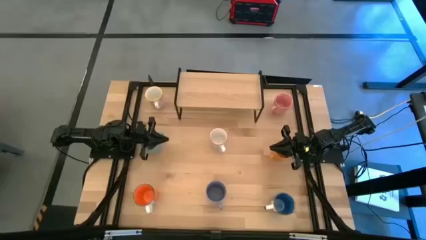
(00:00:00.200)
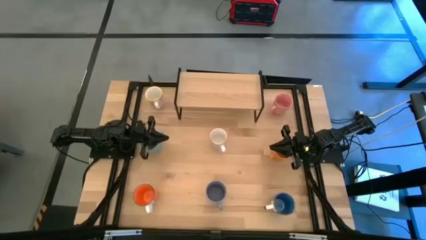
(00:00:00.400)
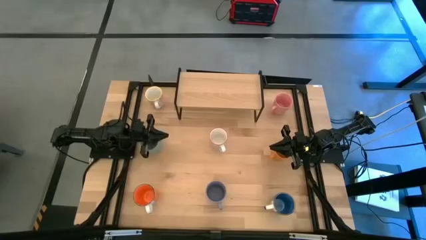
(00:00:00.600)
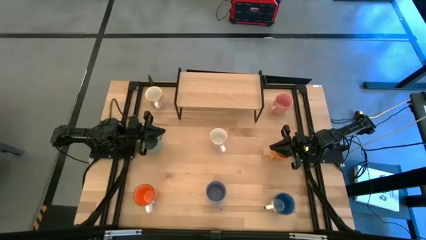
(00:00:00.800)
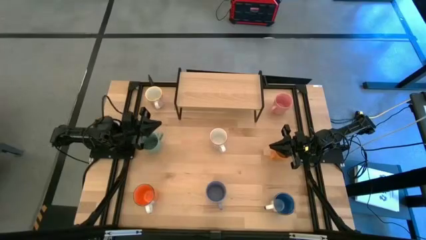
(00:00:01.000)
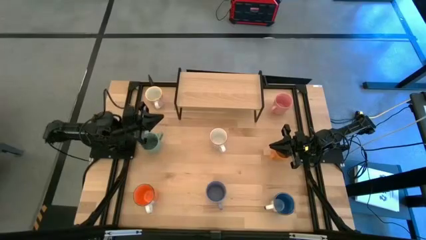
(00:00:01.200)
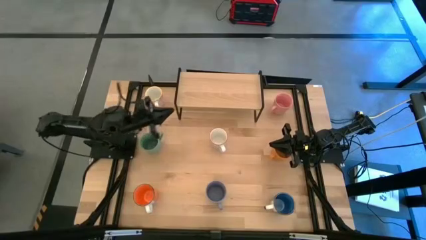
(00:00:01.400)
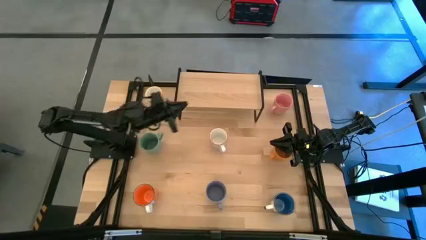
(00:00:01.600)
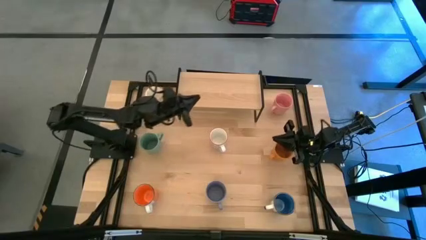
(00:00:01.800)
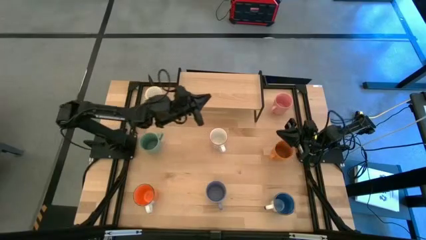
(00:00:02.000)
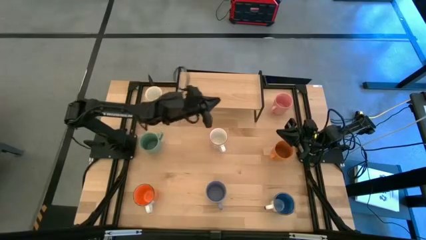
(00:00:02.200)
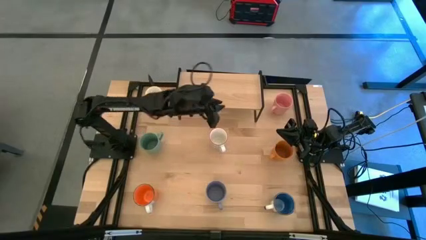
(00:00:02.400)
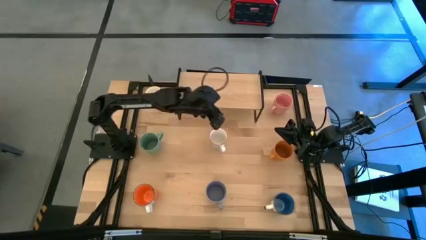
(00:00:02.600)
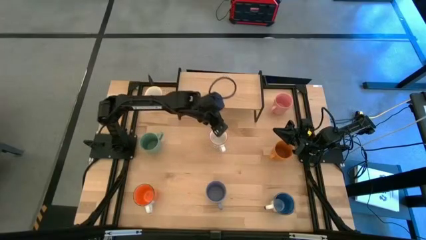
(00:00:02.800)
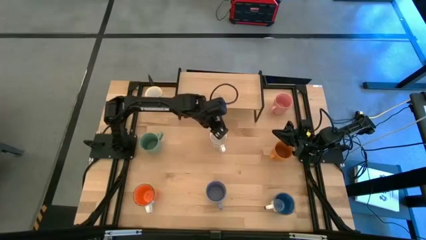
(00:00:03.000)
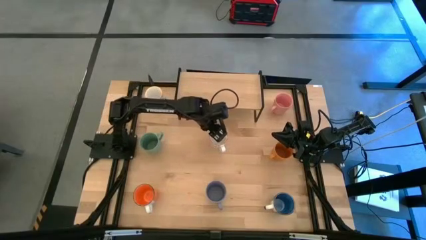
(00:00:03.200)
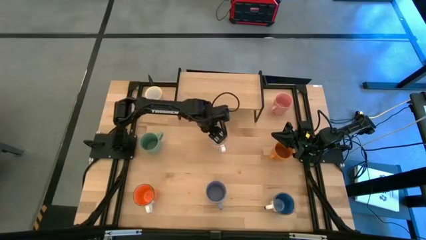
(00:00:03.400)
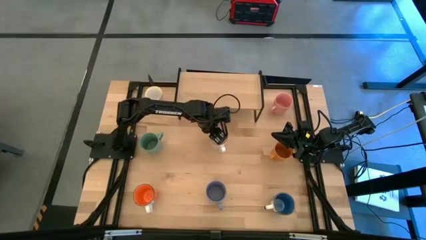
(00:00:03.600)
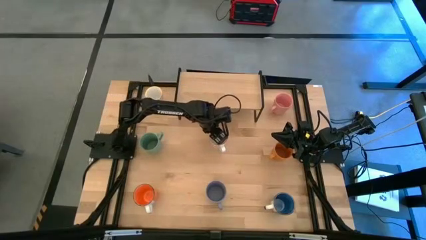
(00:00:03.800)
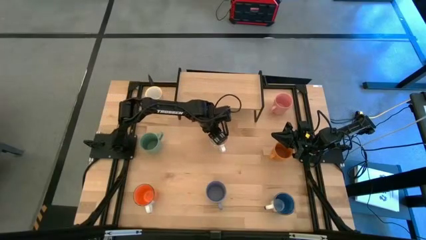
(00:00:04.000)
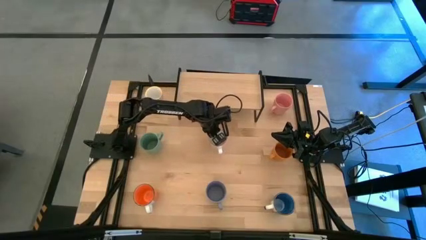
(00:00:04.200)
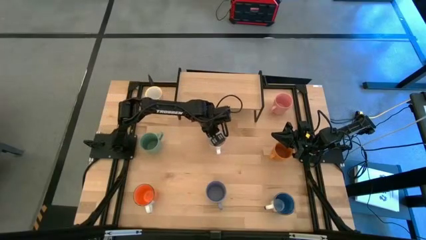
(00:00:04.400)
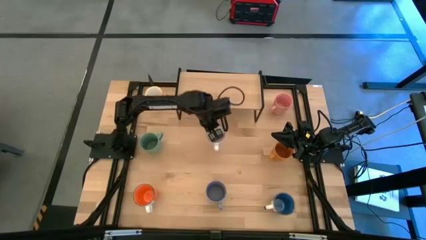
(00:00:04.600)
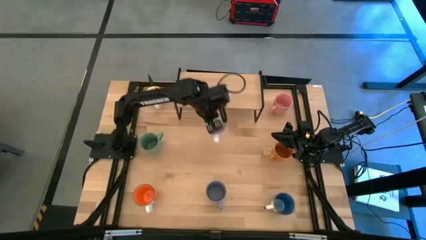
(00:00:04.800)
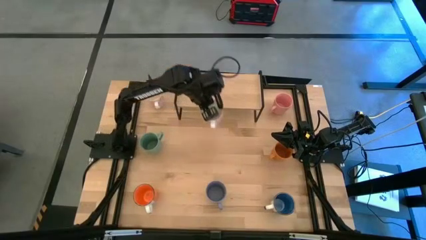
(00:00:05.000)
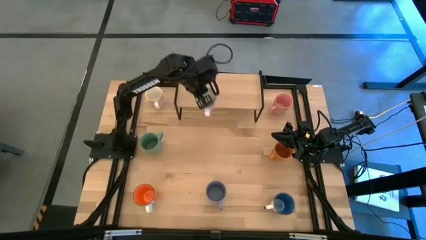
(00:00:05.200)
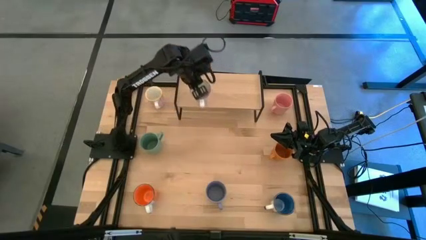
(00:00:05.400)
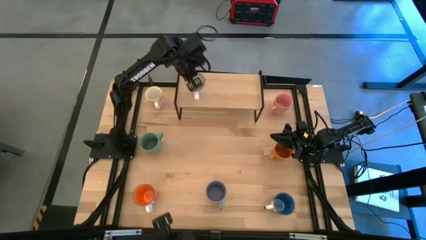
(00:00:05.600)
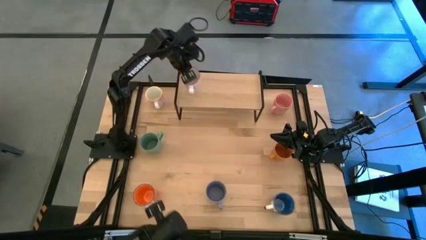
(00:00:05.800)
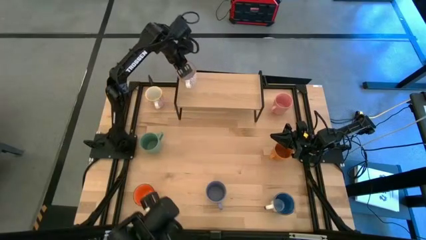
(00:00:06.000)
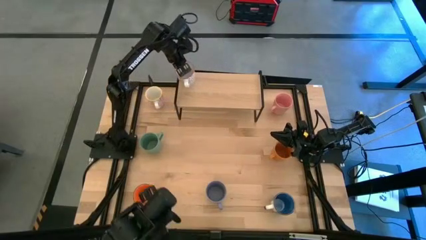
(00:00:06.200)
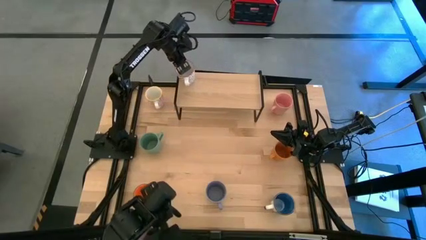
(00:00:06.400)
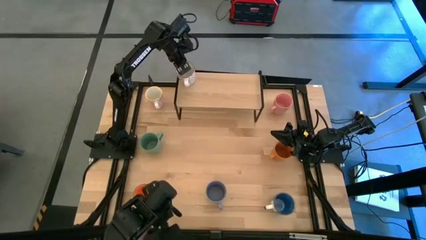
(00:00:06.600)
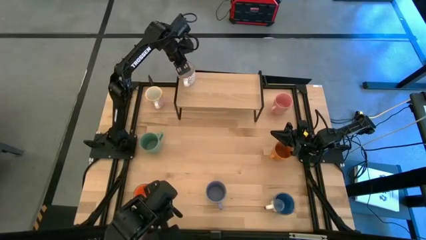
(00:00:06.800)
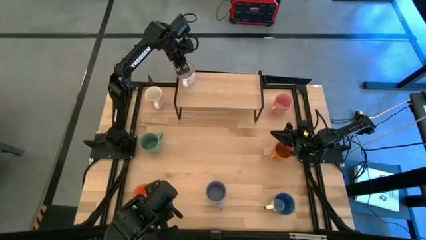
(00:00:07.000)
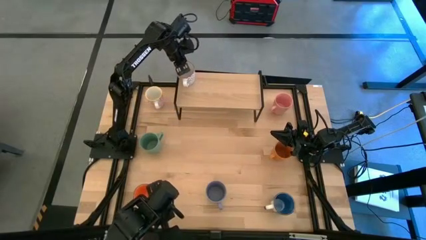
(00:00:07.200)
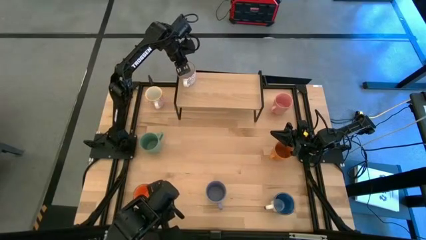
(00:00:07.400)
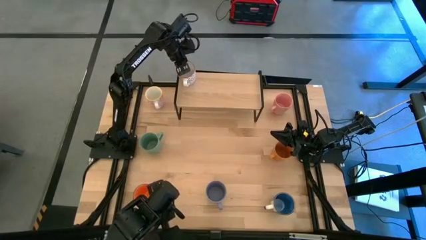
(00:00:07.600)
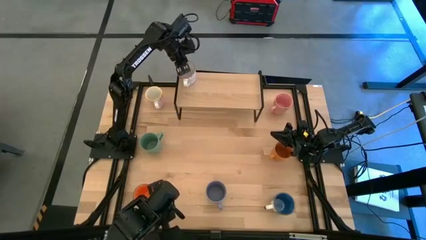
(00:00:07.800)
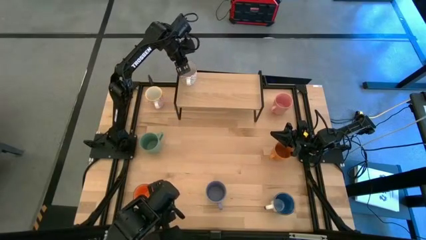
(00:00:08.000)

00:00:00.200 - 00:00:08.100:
Task: Place coffee mugs
Put the white patterned mug on the shelf

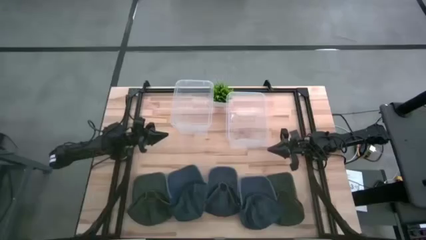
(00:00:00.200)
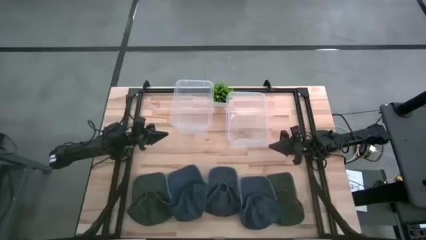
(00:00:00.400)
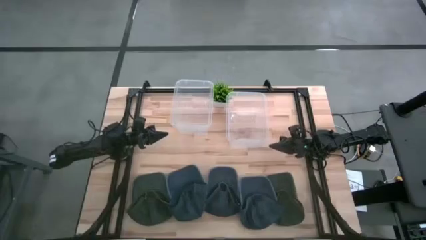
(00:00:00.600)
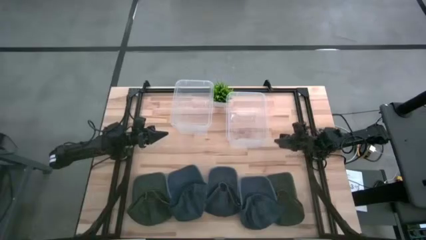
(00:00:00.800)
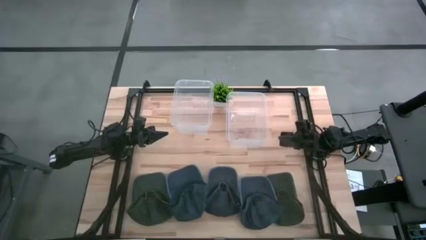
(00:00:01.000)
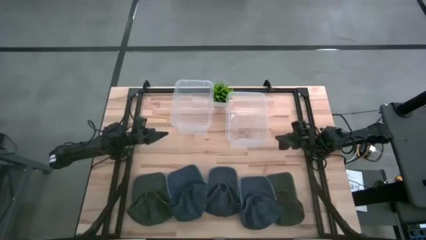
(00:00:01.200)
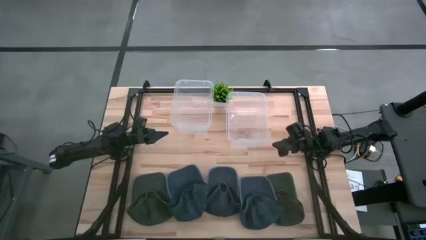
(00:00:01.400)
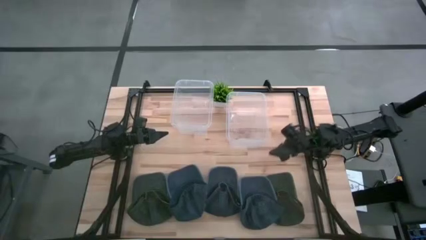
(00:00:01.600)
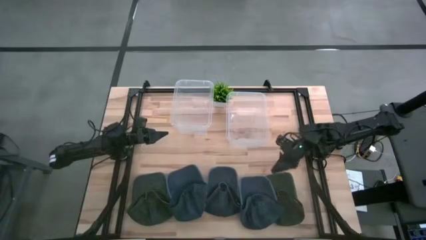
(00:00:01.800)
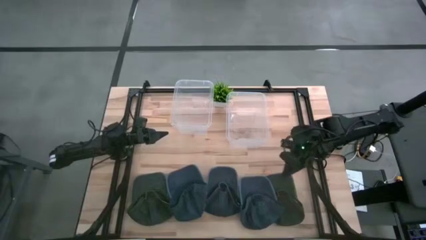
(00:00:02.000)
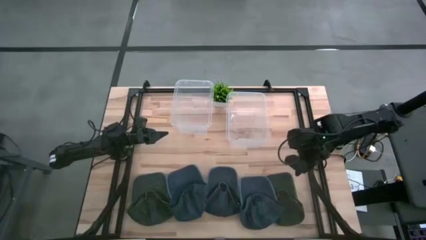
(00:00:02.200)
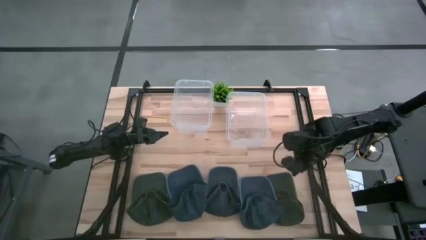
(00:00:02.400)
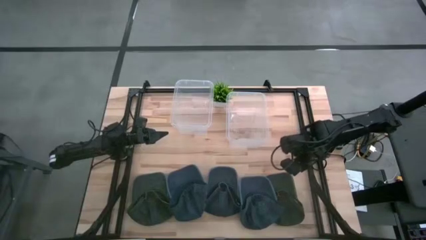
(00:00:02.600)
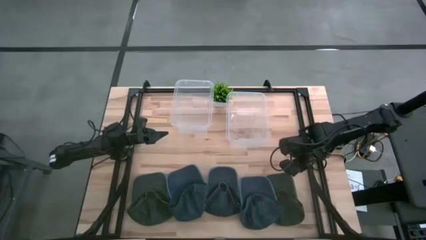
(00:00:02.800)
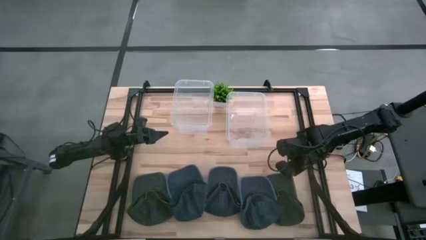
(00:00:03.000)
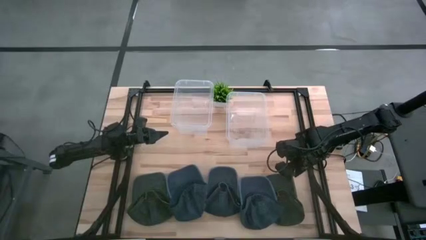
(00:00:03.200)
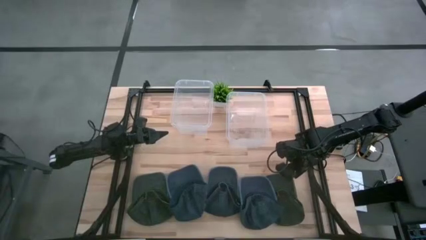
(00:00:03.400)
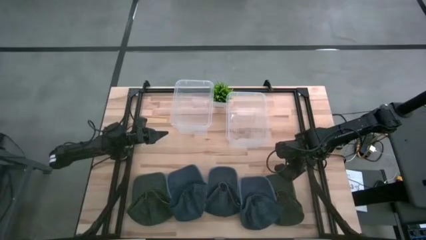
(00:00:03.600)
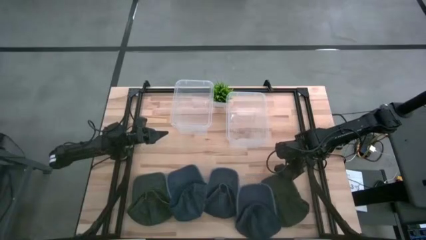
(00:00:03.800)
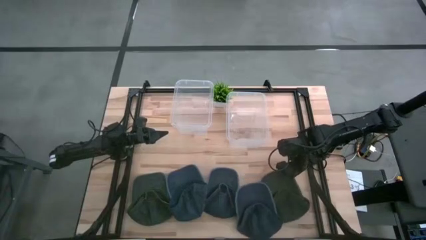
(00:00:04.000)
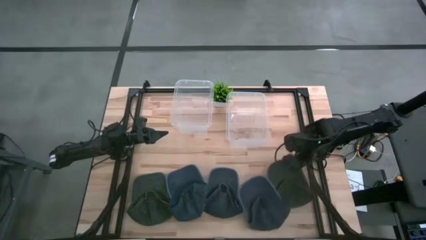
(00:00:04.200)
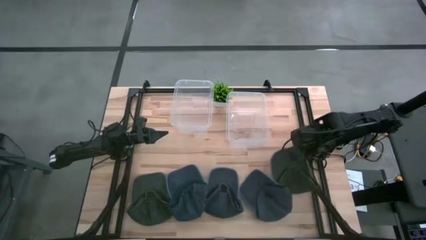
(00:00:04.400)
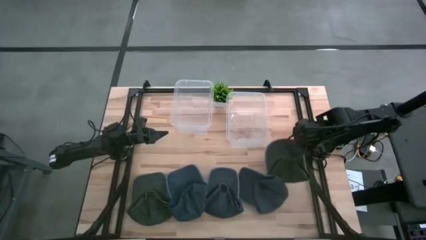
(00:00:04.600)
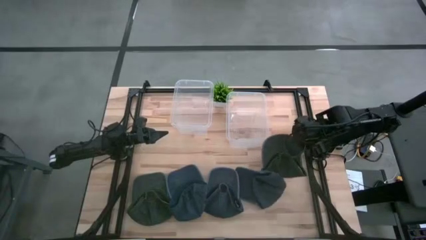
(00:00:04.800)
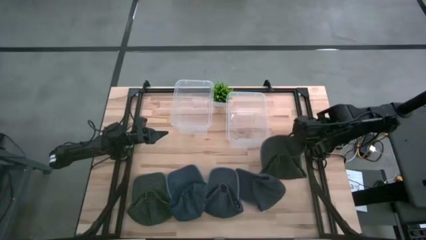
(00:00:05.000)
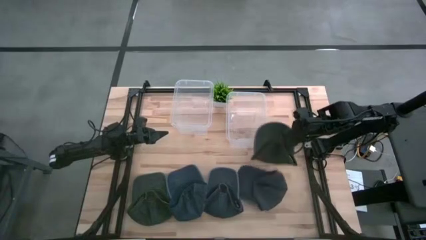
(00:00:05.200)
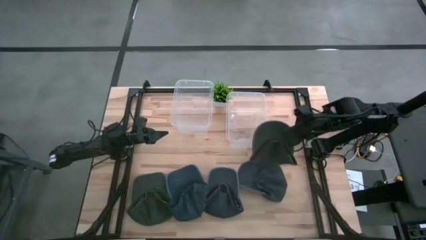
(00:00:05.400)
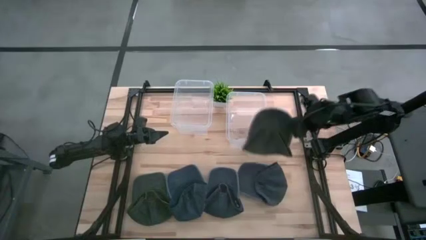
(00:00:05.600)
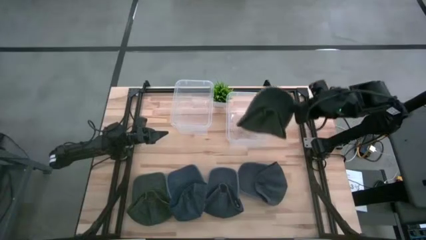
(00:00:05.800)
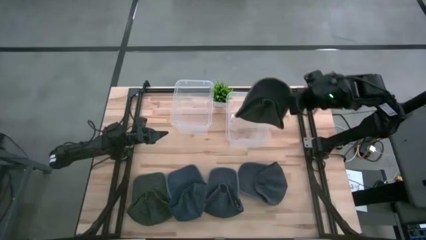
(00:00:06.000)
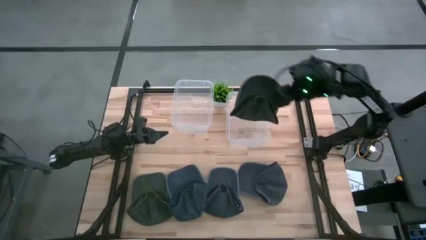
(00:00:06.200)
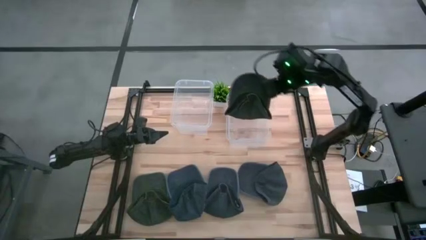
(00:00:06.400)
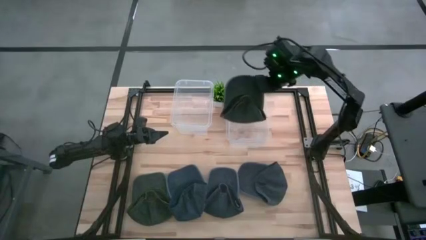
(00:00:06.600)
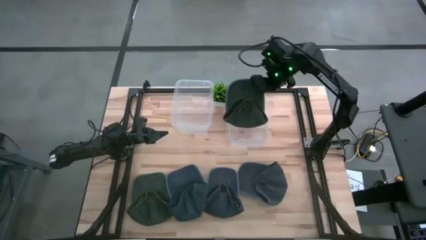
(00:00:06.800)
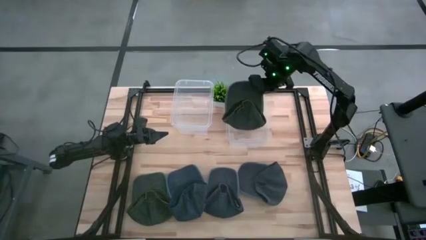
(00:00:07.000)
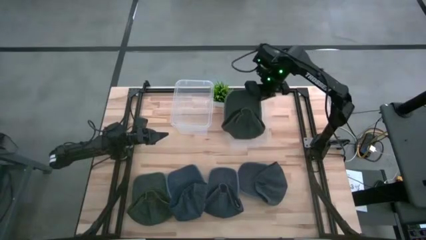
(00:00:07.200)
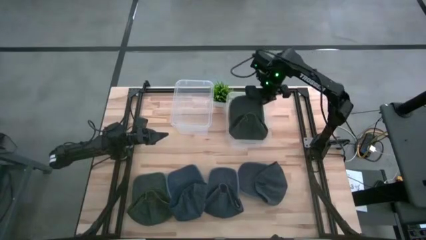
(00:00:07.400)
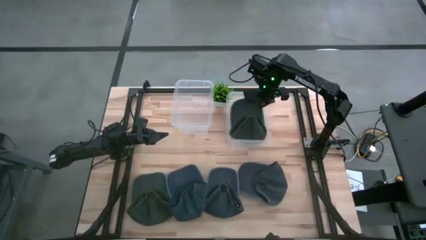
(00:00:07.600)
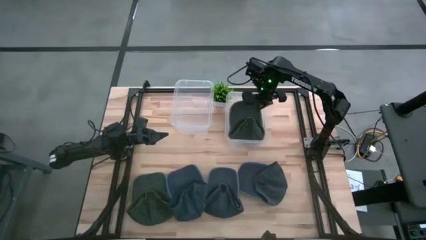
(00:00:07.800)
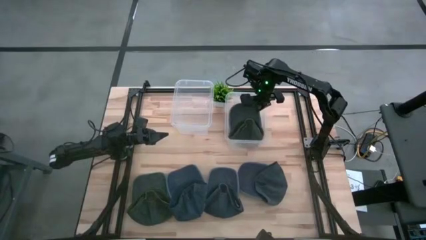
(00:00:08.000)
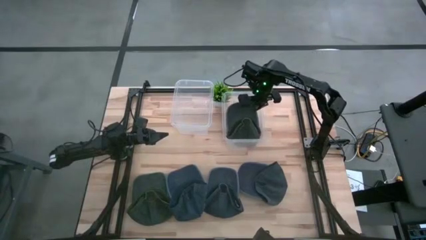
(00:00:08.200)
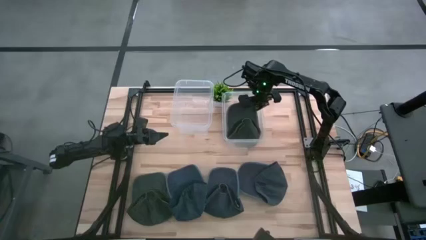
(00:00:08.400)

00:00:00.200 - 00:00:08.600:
Task: Pick & Place hat
Put the right black cap into the right transparent bin
